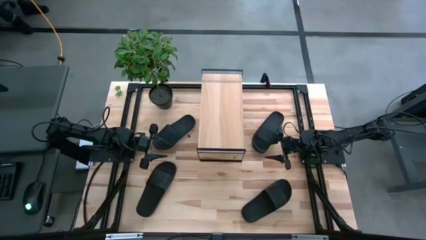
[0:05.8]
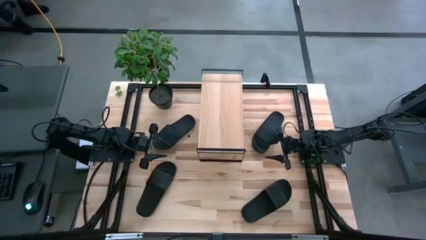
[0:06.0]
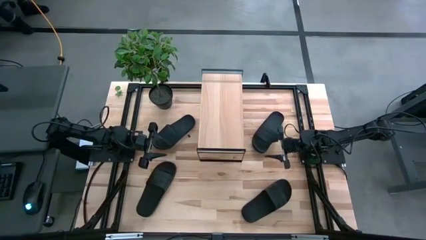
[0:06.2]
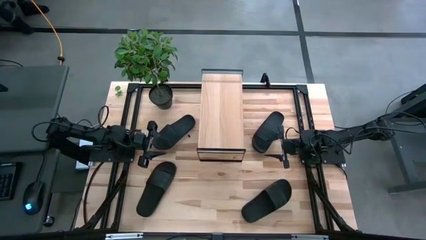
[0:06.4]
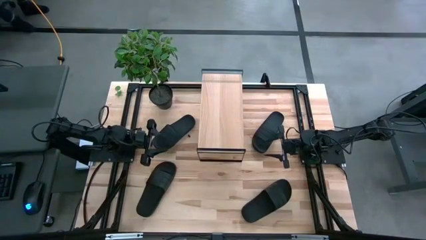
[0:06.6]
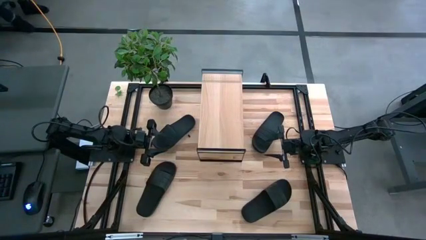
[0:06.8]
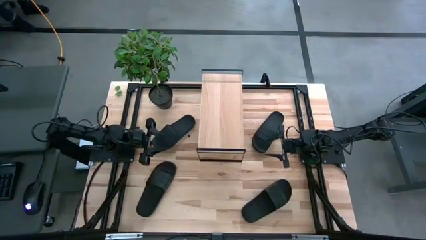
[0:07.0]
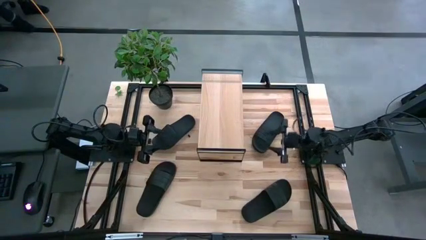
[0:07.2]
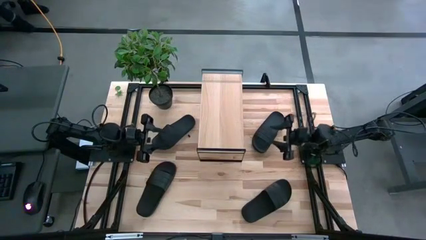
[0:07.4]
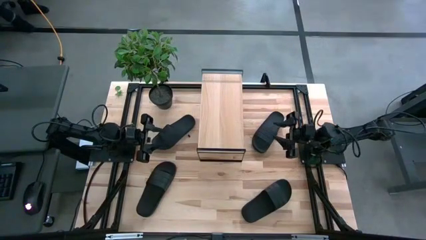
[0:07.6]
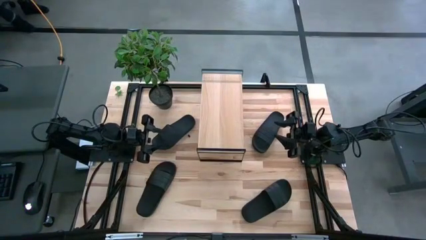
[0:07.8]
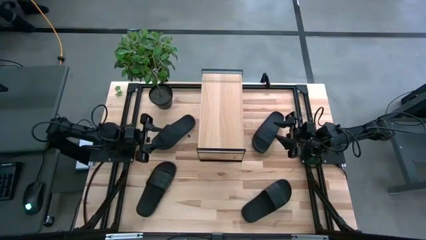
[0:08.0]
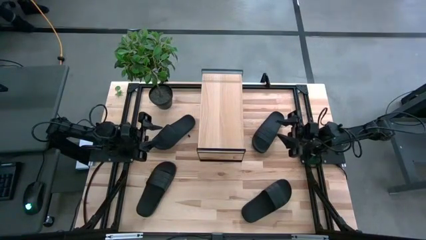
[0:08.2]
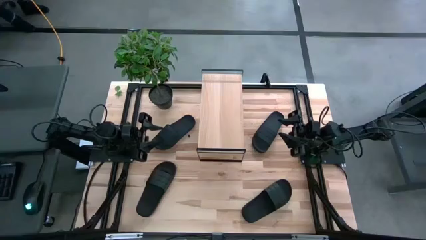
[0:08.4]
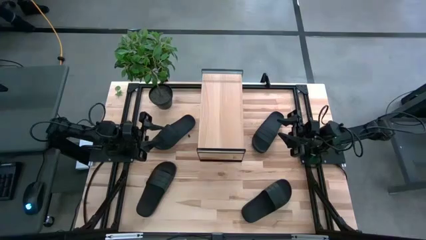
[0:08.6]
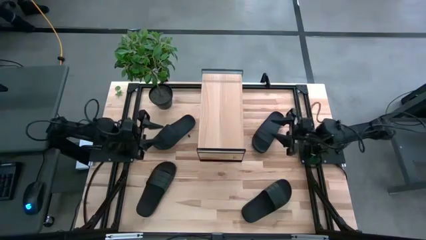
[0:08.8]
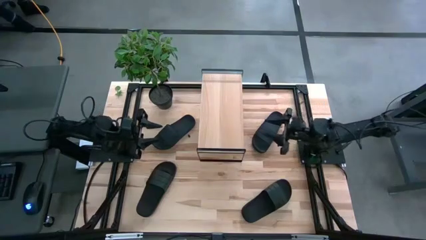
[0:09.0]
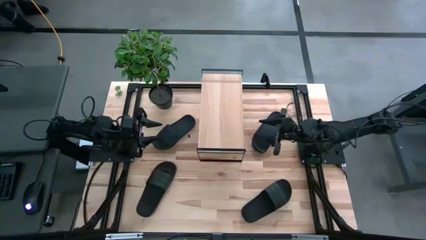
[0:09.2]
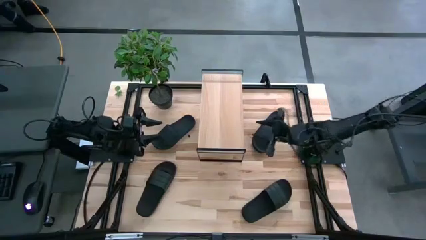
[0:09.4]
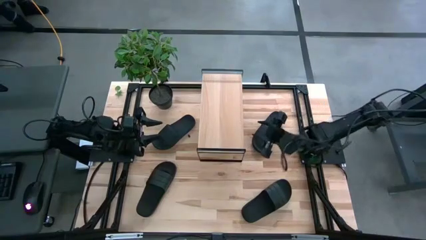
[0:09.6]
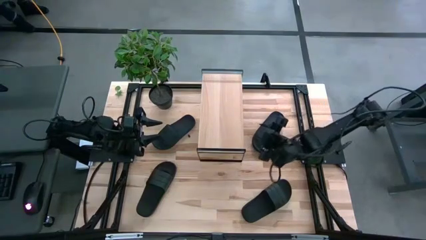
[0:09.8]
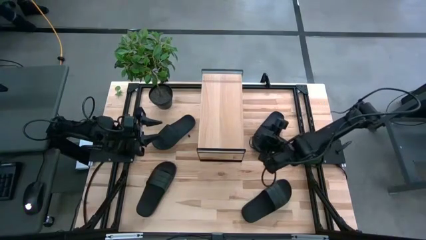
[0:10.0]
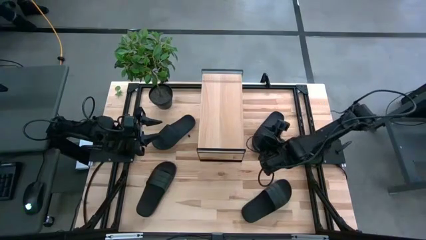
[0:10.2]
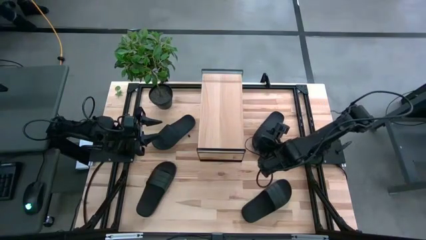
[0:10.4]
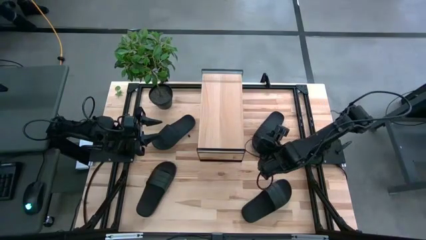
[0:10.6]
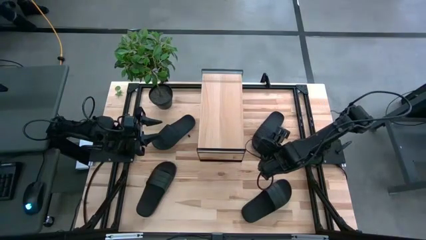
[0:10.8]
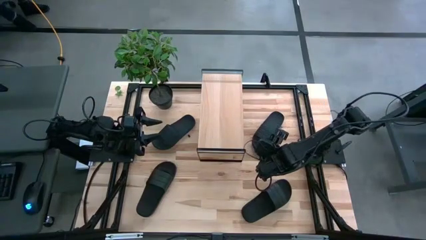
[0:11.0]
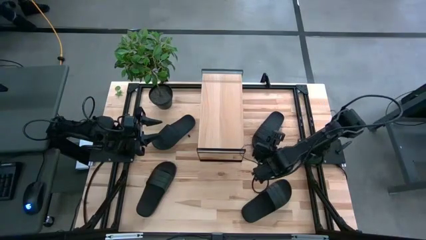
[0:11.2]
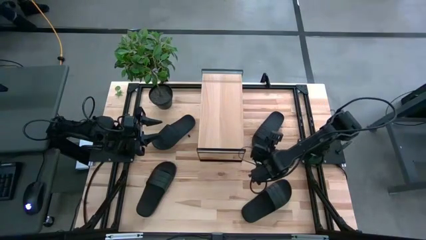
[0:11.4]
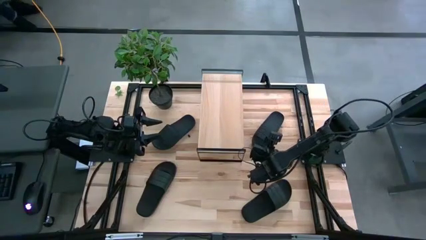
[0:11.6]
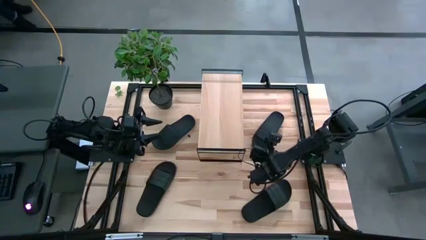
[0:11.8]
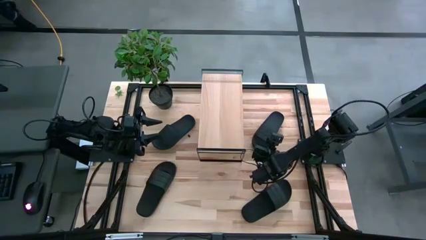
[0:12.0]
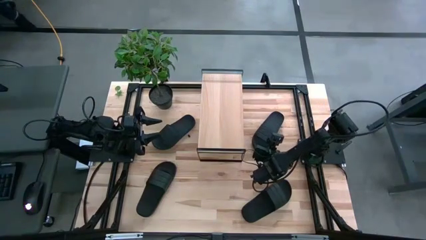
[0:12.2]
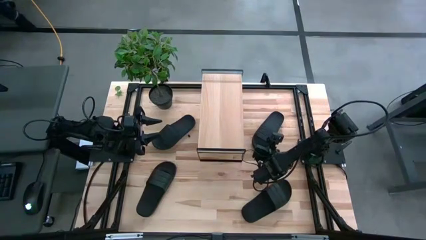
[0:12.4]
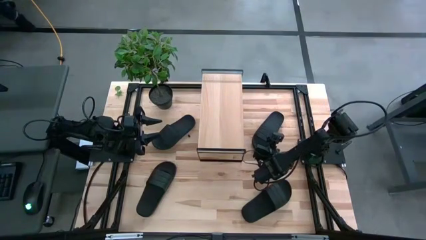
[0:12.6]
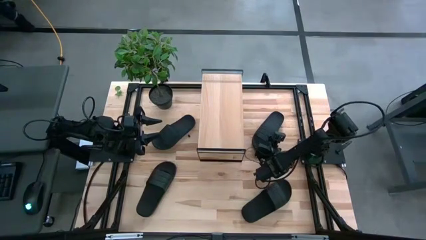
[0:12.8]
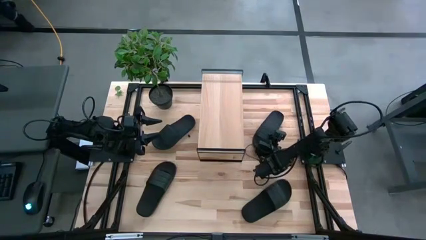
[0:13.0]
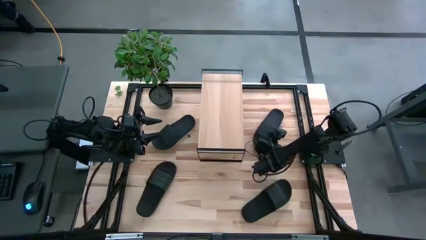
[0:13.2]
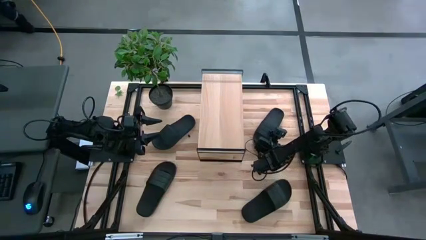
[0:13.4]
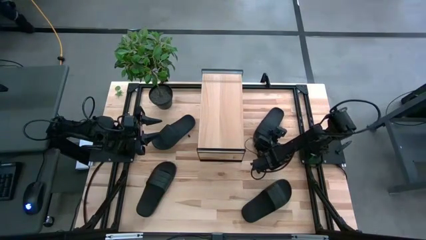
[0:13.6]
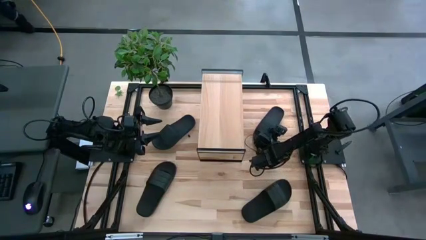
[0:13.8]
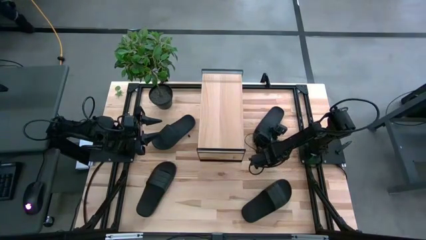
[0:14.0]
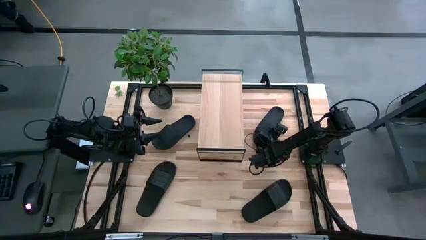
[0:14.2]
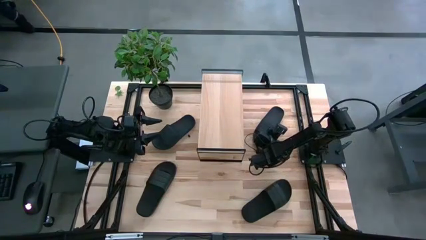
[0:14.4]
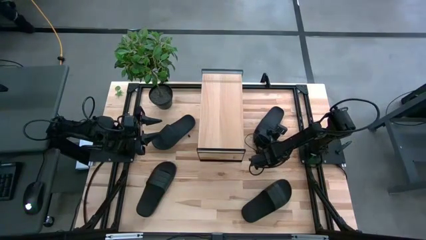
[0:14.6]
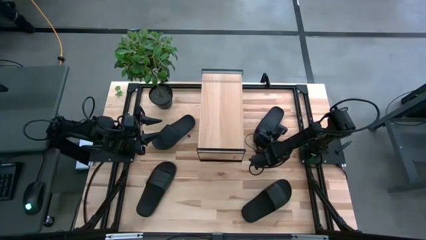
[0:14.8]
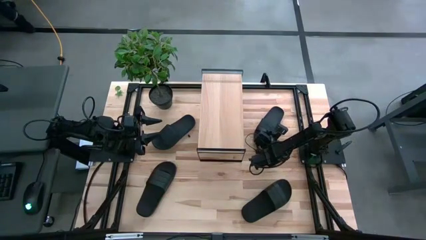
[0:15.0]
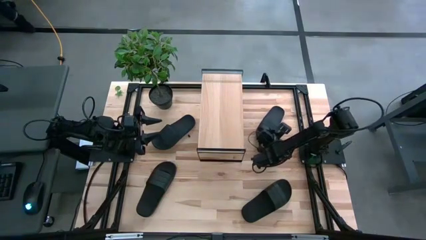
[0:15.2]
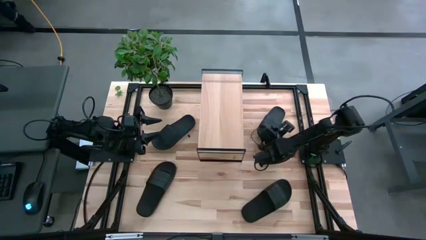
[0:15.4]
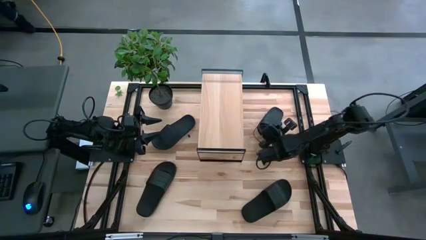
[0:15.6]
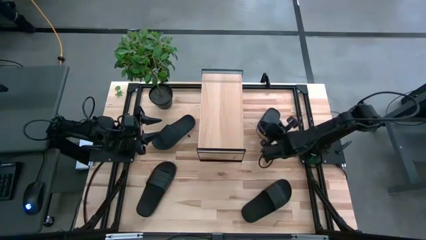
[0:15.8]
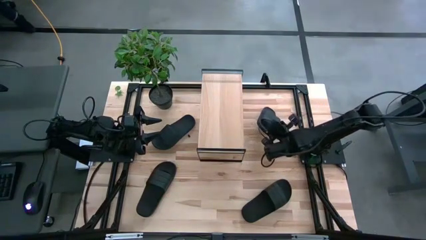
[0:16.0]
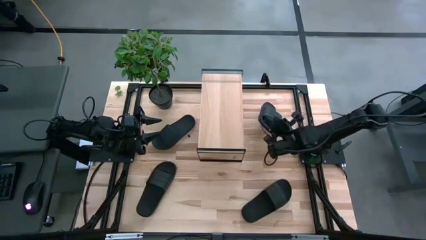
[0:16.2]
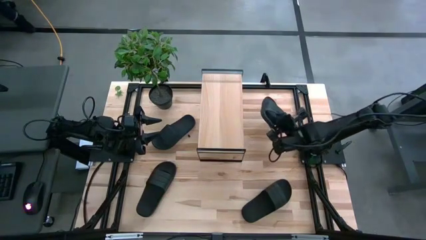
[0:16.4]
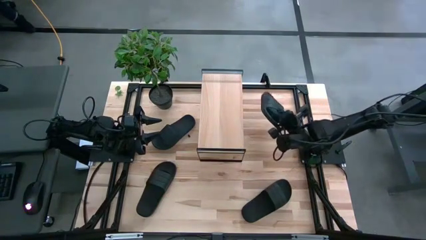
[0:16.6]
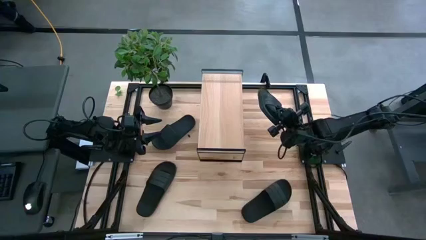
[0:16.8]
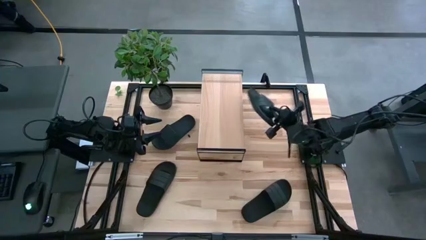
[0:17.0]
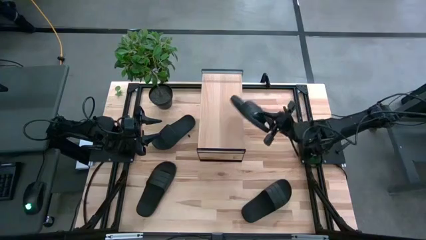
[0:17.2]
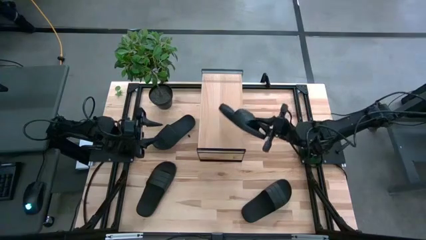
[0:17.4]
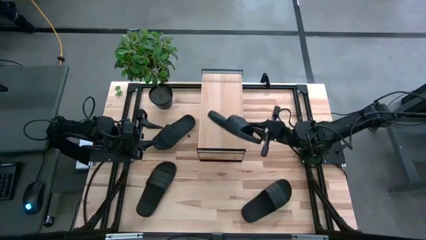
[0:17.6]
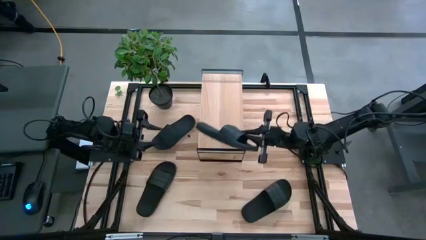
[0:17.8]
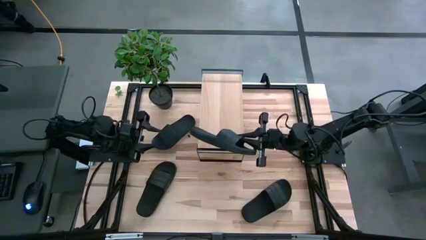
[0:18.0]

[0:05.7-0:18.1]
Task: Pick and place slides into the shelf
Put the top right black slipper on the shelf
